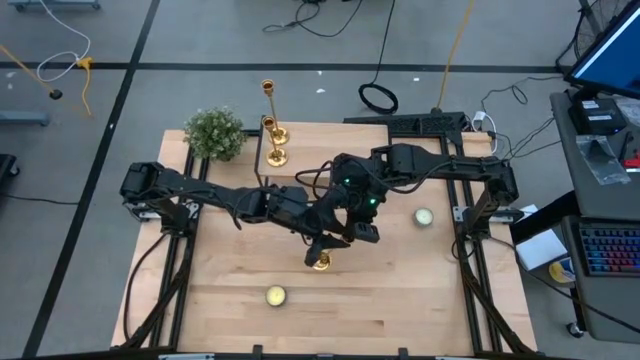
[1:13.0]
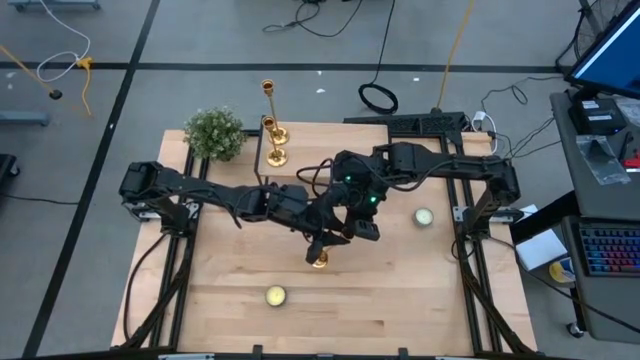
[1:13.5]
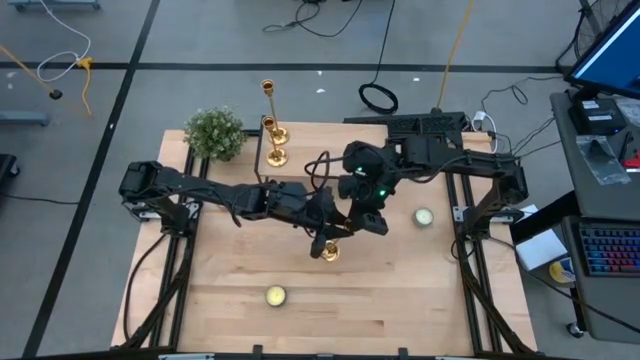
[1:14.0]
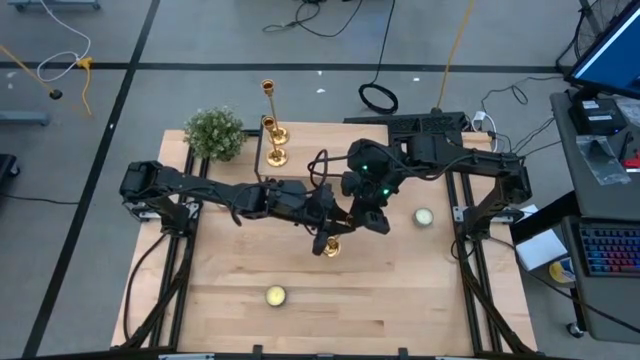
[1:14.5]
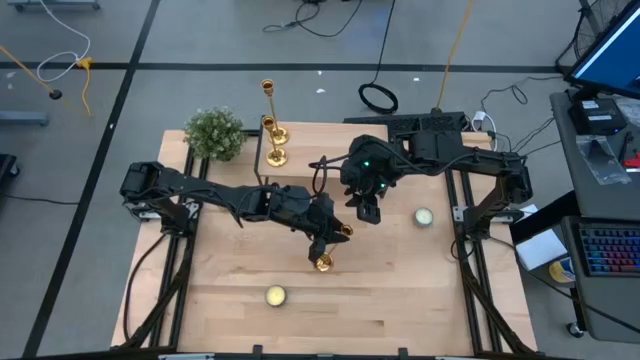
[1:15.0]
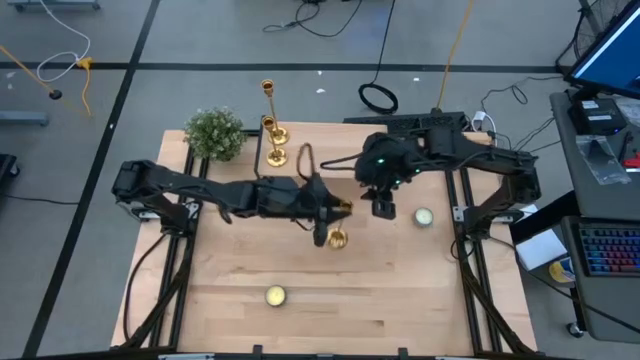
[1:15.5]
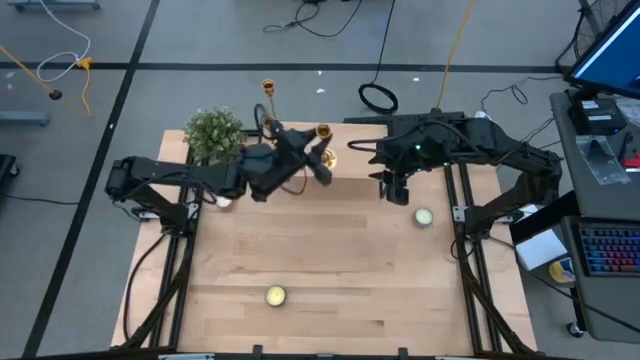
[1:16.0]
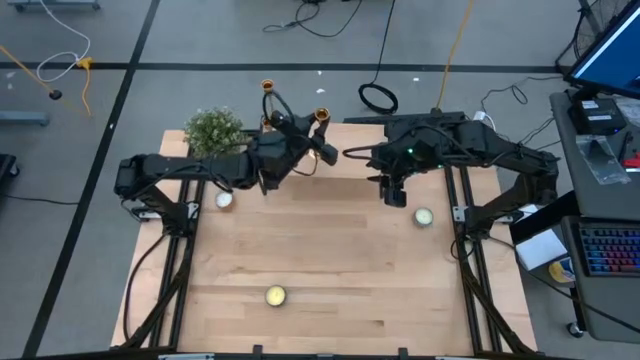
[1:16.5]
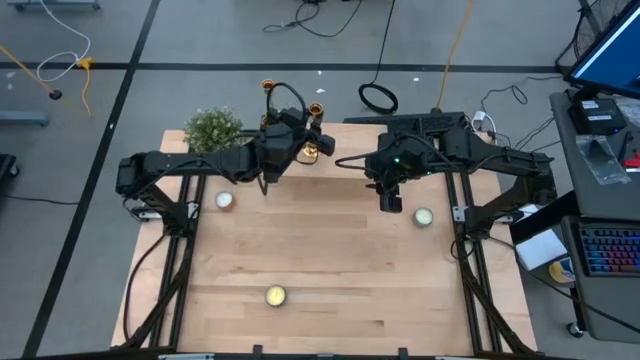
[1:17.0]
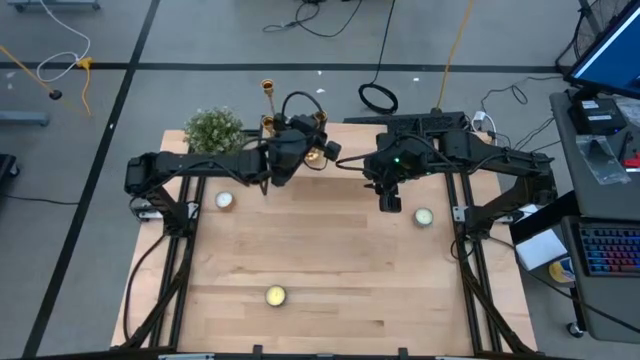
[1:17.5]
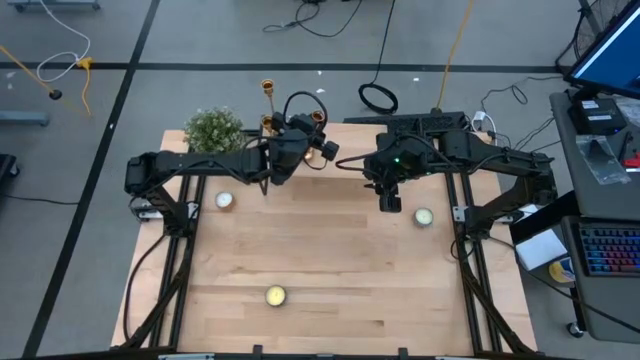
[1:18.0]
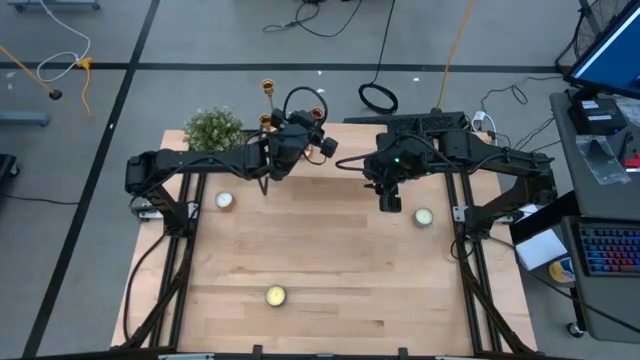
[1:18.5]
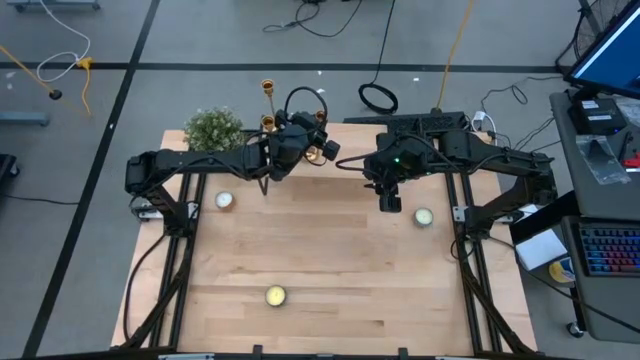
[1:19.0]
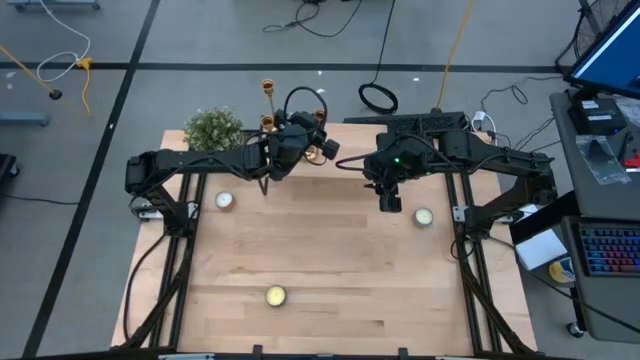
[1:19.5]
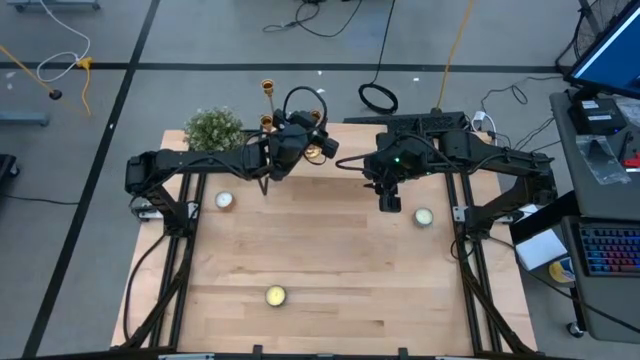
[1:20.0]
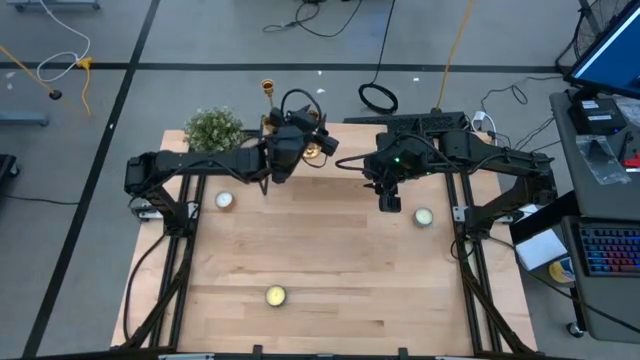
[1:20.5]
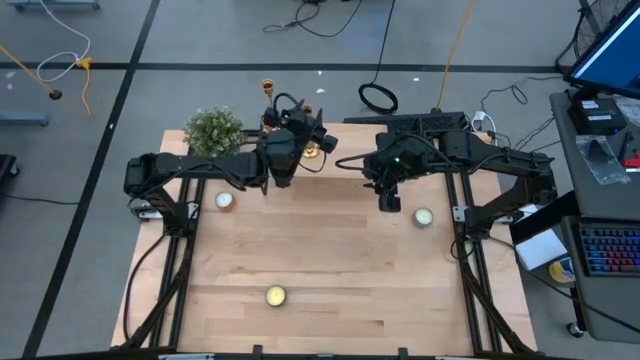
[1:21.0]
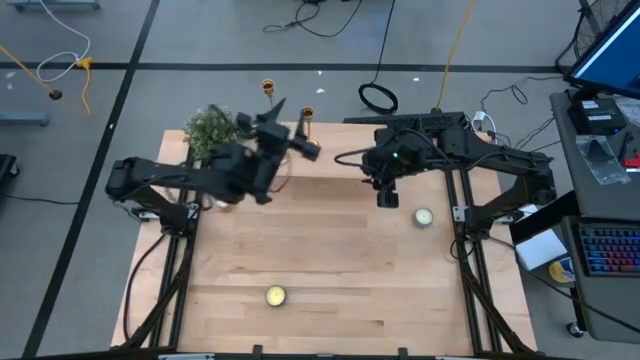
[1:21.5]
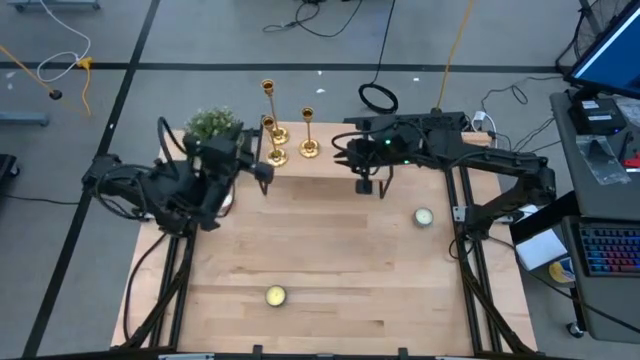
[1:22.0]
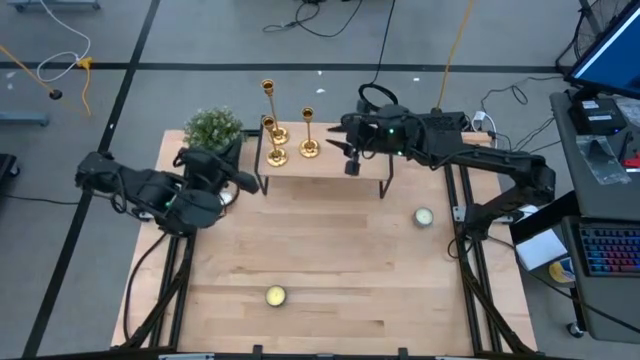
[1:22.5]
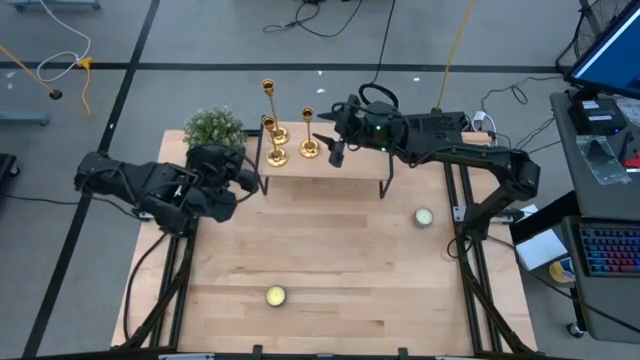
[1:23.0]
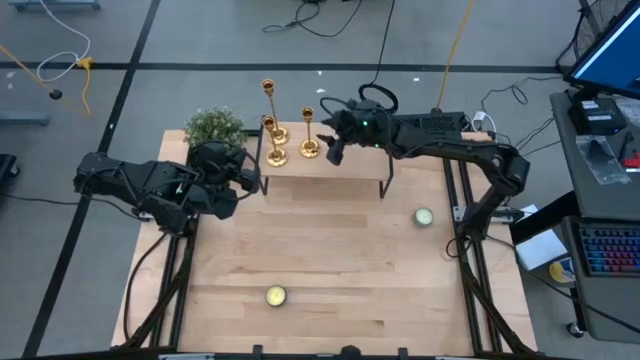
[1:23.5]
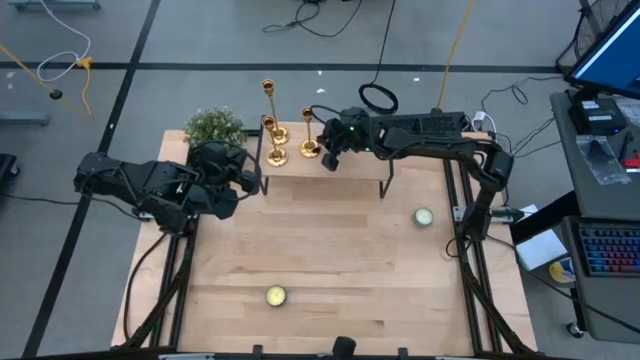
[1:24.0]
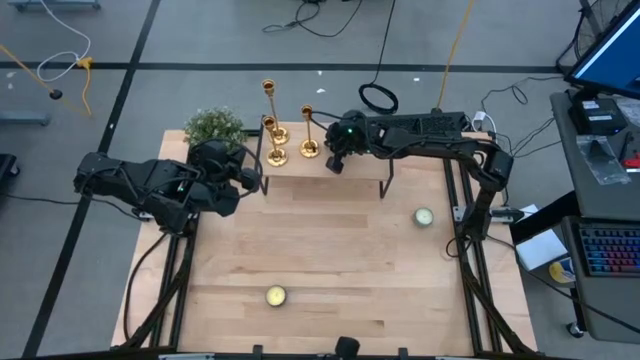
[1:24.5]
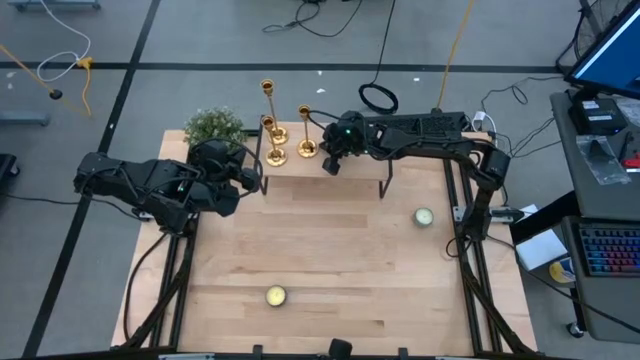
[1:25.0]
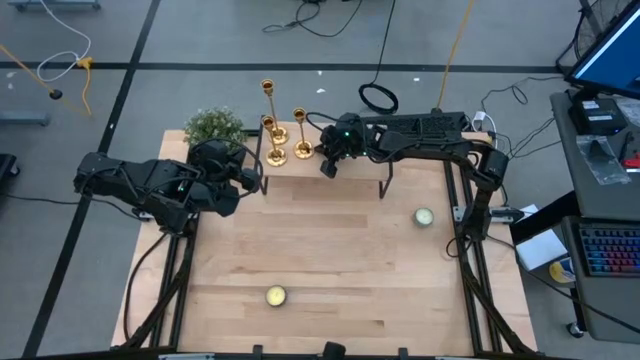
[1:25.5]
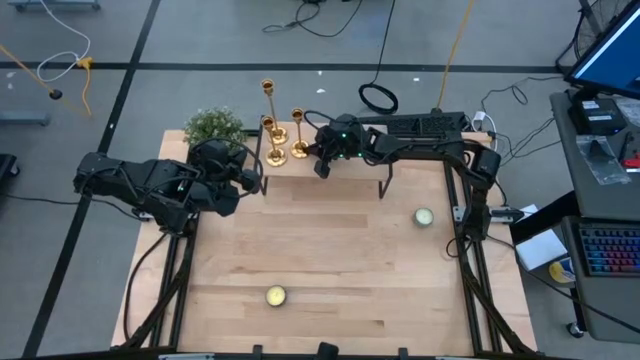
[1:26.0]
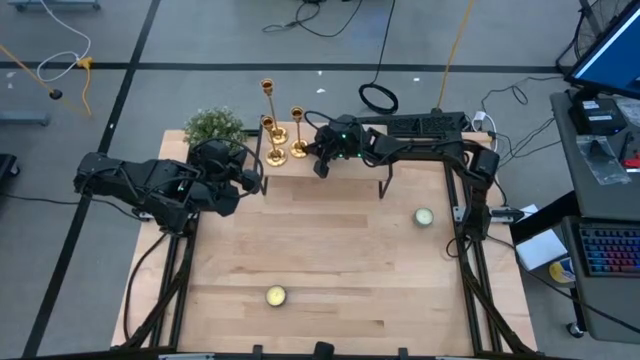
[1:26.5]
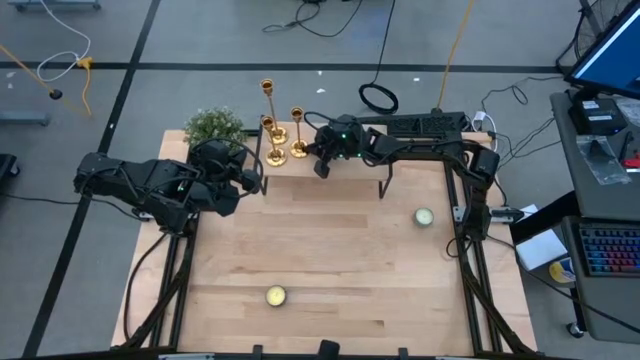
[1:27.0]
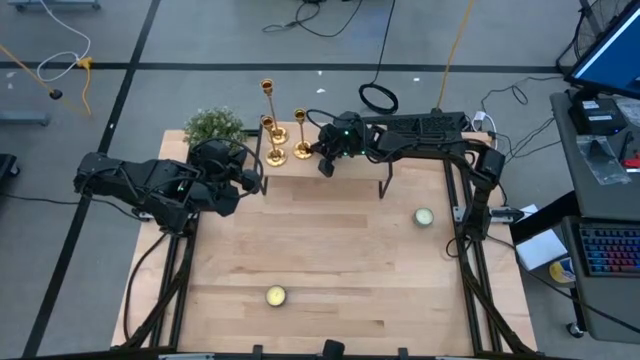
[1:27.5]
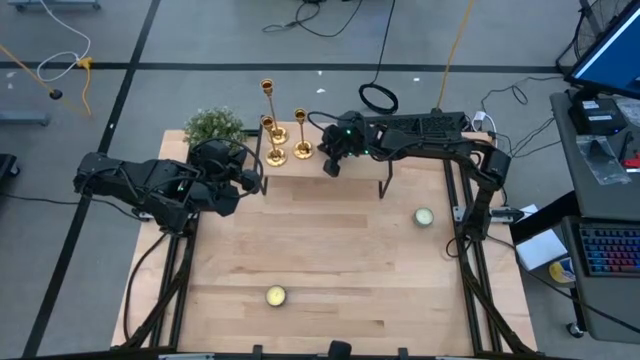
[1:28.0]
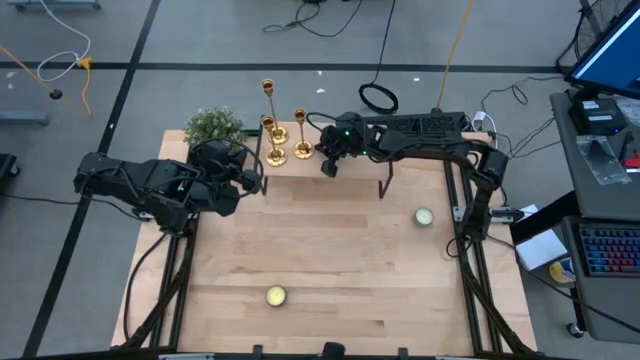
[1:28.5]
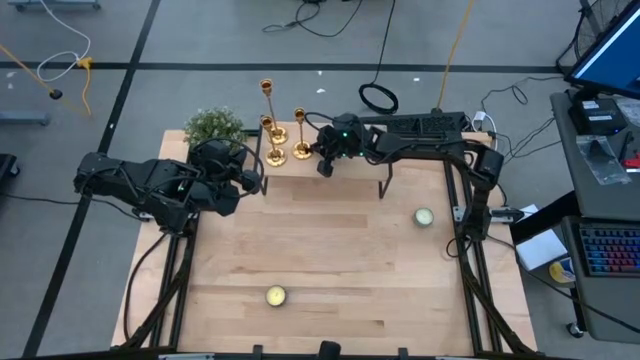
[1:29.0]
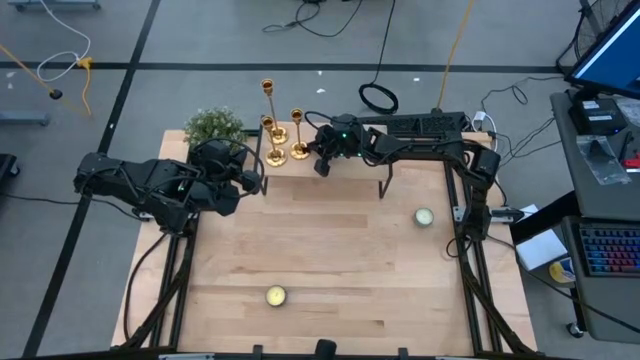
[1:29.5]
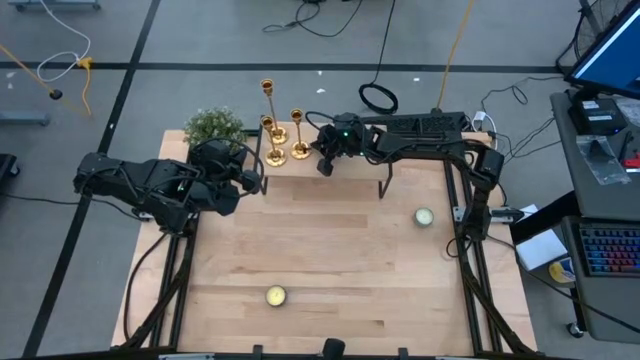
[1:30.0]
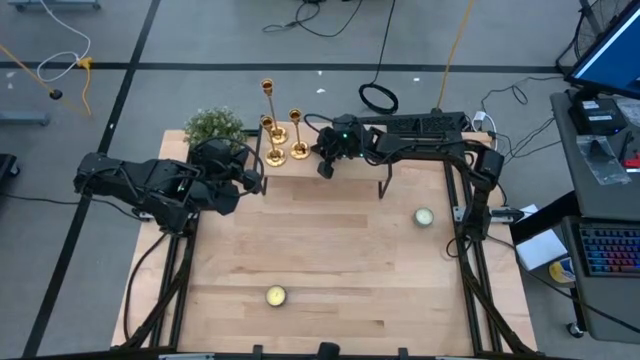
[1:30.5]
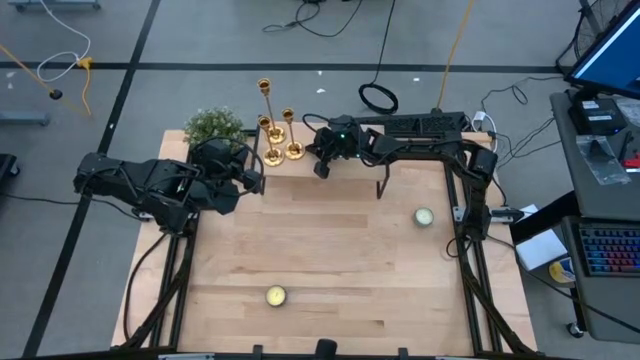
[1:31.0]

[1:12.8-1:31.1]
Task: Pick & Place candle stick holders
Put the gold candle holder on the shelf

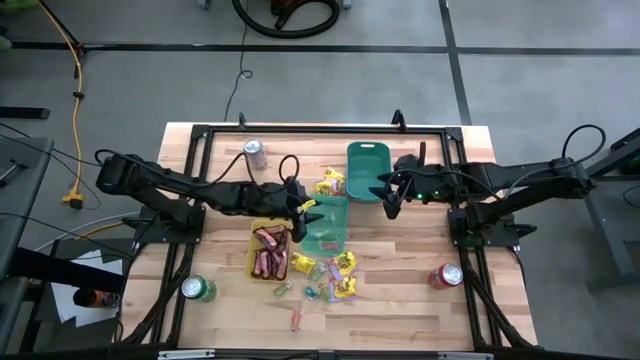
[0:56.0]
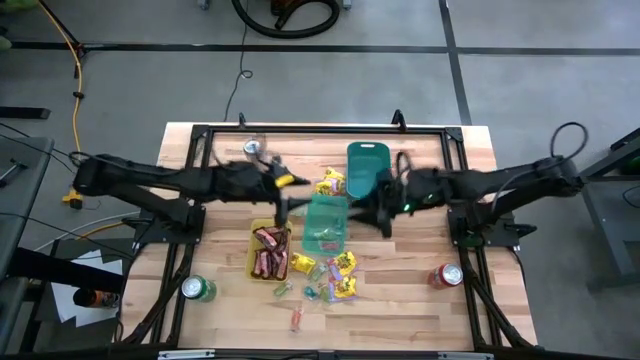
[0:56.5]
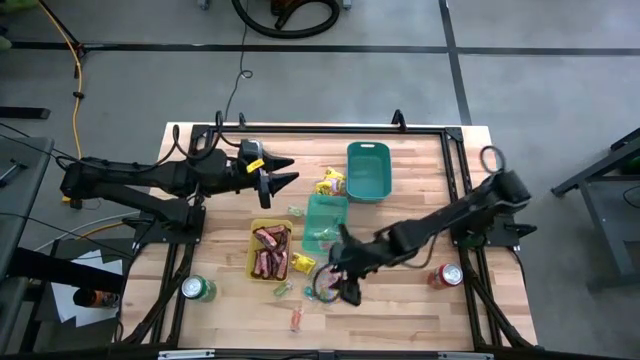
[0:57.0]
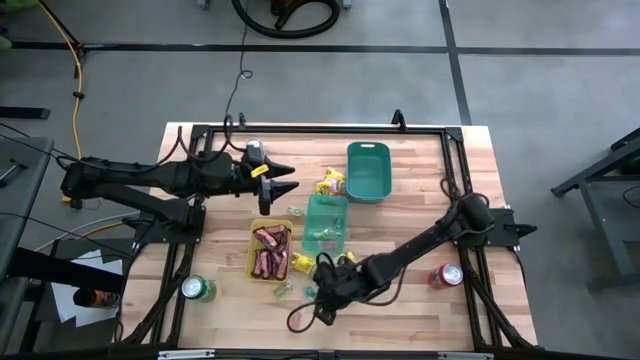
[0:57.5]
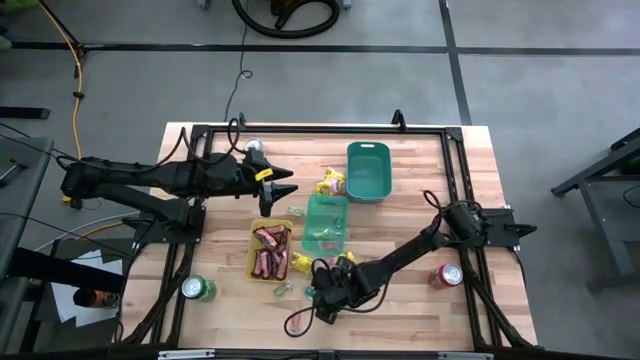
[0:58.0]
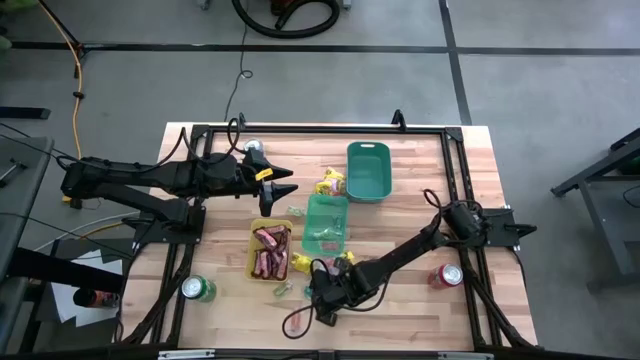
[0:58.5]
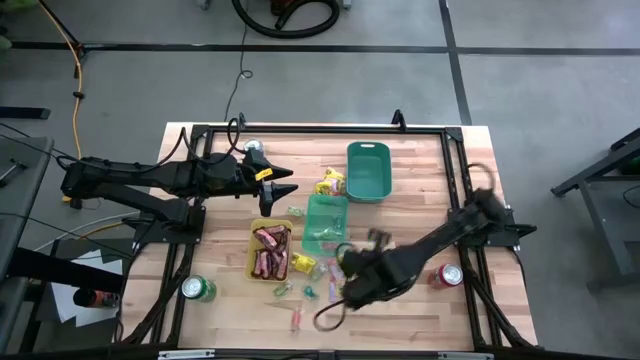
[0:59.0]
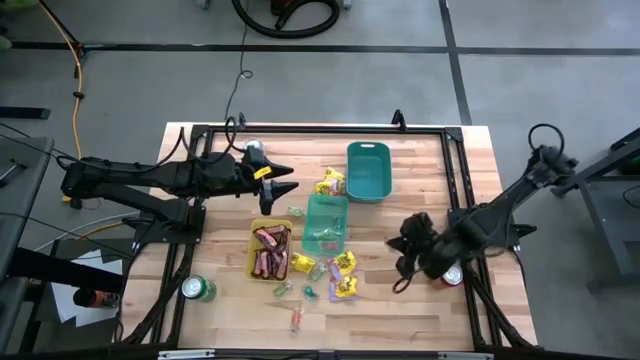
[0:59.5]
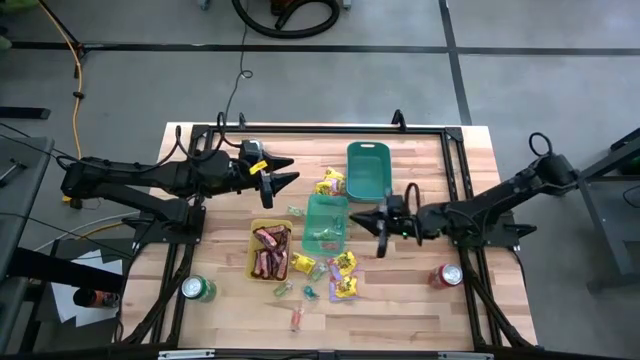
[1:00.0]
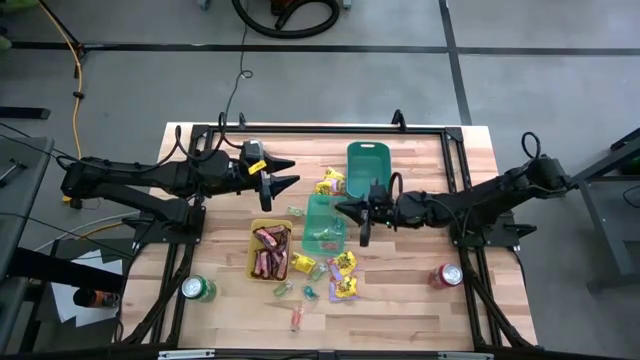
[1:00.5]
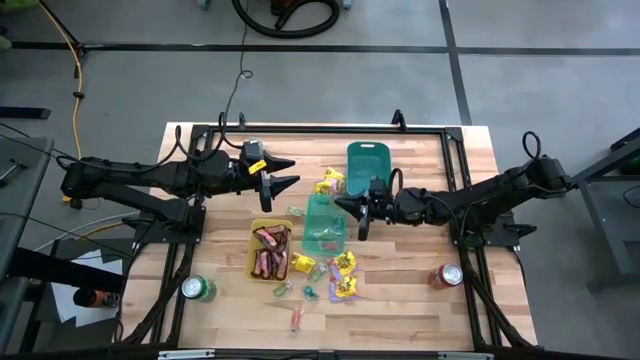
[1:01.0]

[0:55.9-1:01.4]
Task: Sort candy
Put the green gummy into the light blue bin
